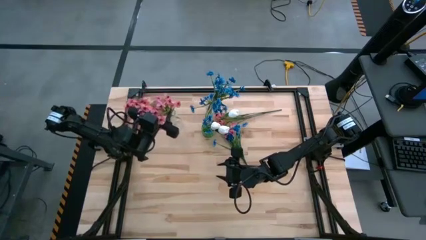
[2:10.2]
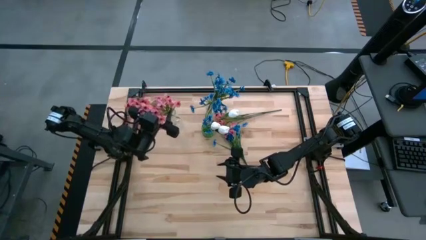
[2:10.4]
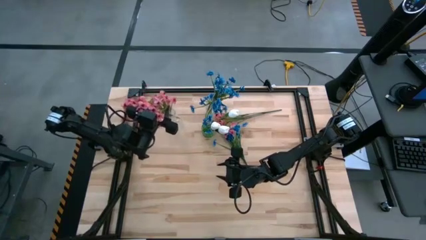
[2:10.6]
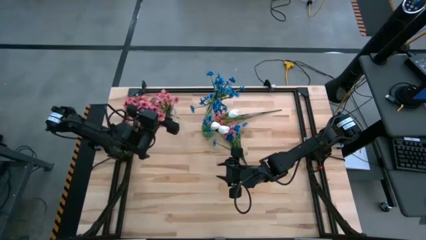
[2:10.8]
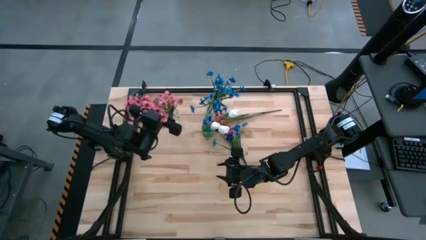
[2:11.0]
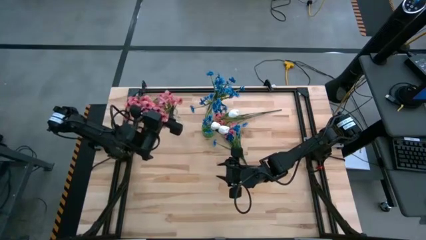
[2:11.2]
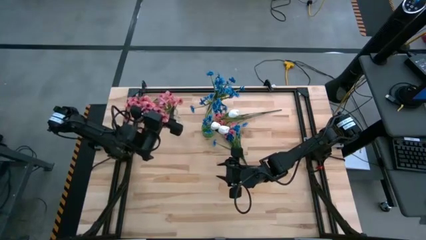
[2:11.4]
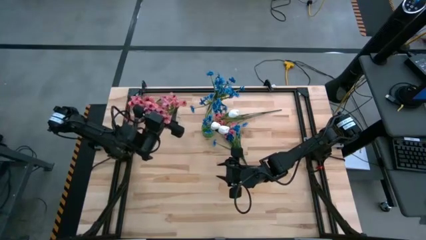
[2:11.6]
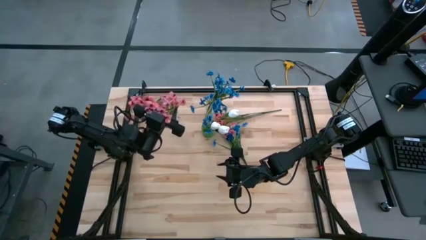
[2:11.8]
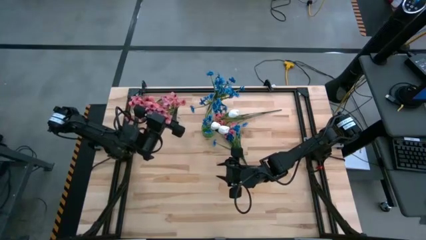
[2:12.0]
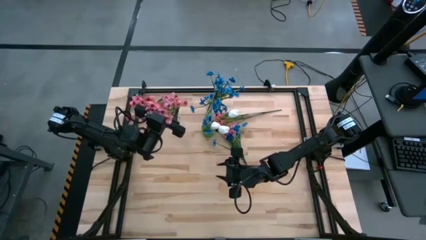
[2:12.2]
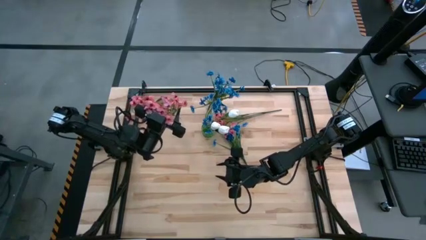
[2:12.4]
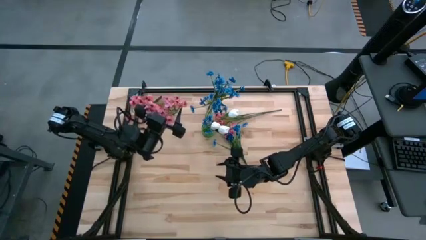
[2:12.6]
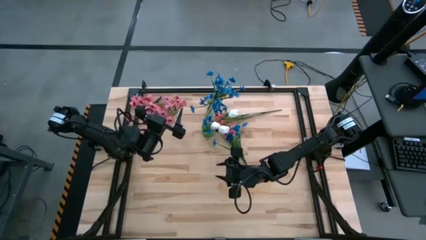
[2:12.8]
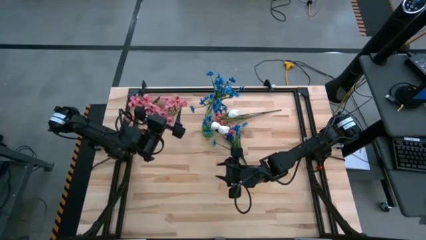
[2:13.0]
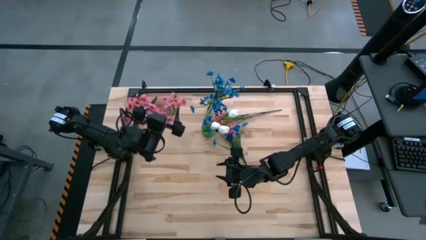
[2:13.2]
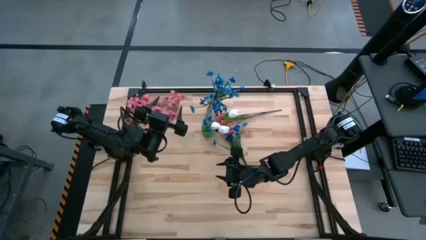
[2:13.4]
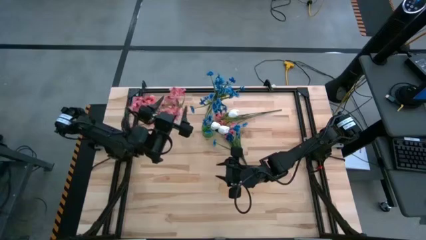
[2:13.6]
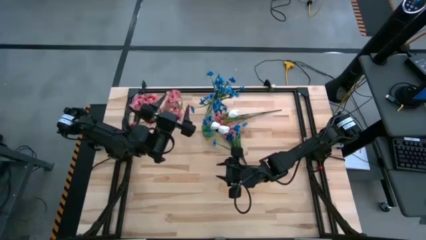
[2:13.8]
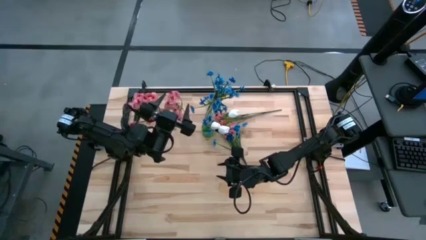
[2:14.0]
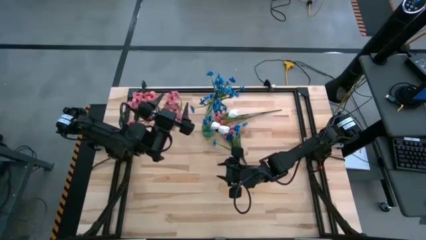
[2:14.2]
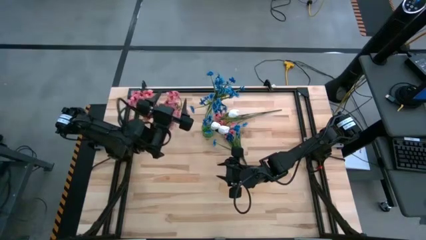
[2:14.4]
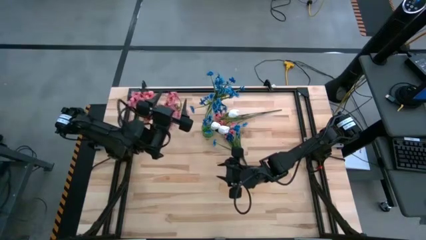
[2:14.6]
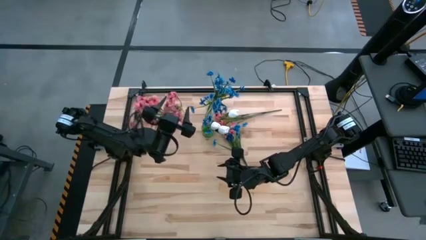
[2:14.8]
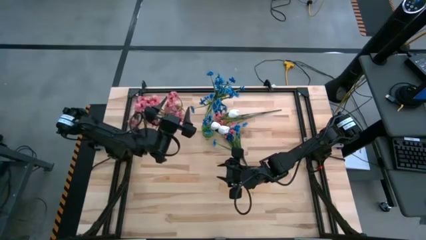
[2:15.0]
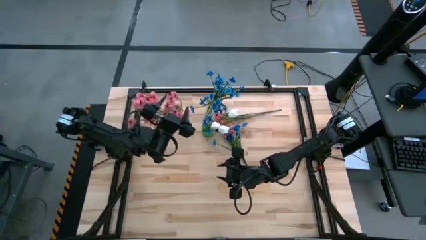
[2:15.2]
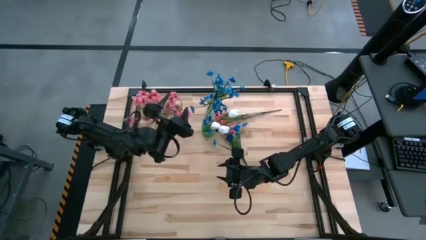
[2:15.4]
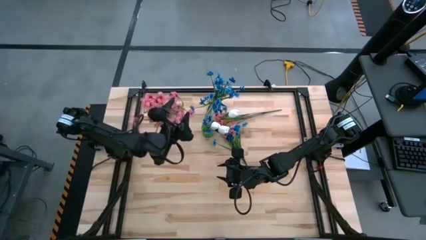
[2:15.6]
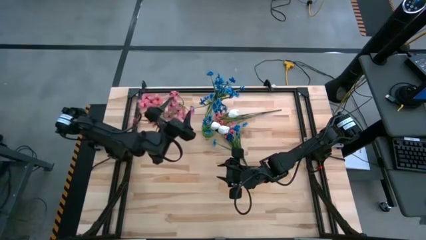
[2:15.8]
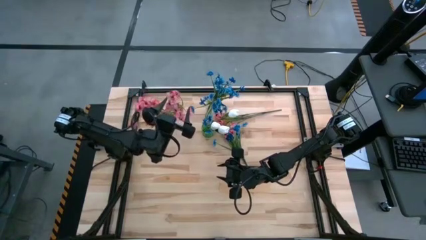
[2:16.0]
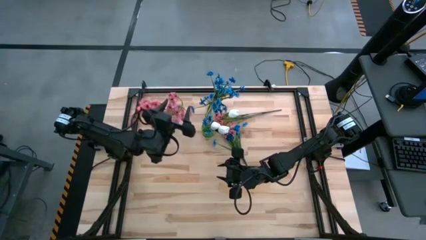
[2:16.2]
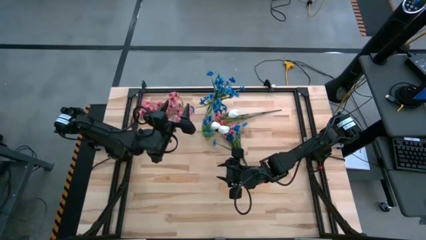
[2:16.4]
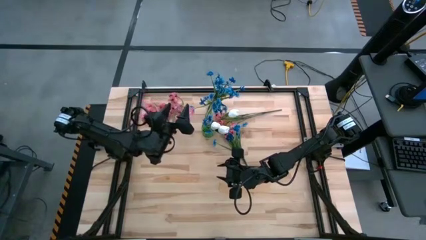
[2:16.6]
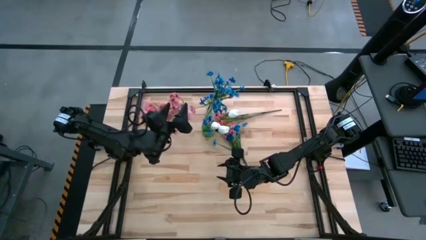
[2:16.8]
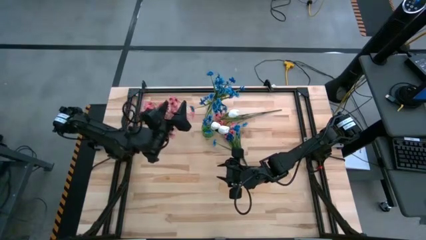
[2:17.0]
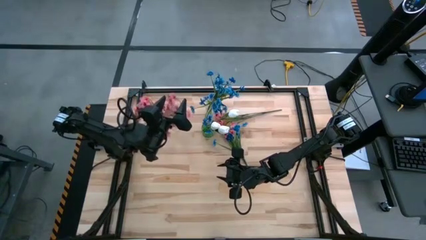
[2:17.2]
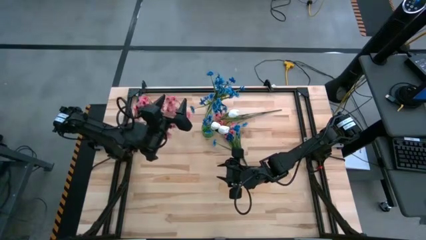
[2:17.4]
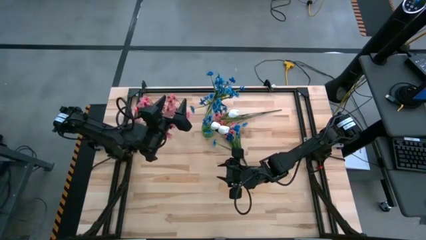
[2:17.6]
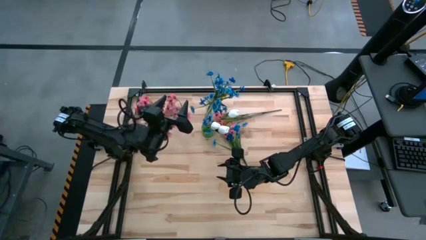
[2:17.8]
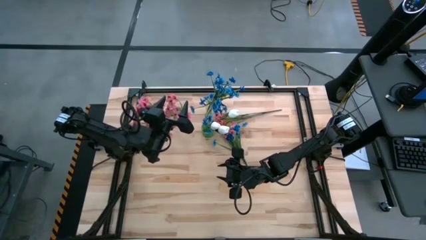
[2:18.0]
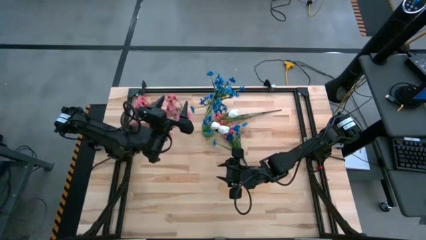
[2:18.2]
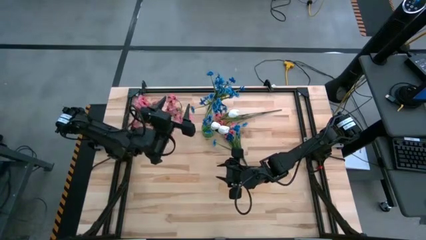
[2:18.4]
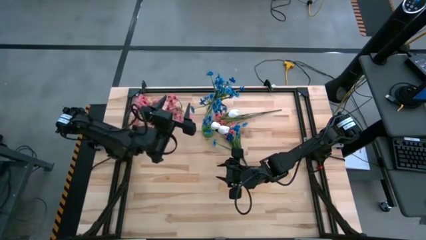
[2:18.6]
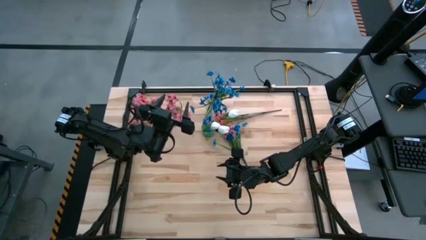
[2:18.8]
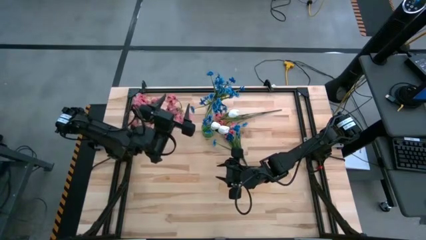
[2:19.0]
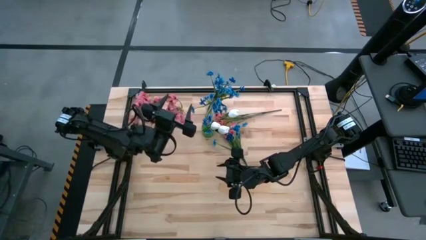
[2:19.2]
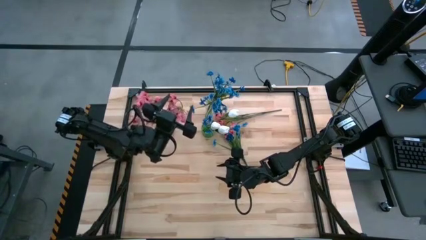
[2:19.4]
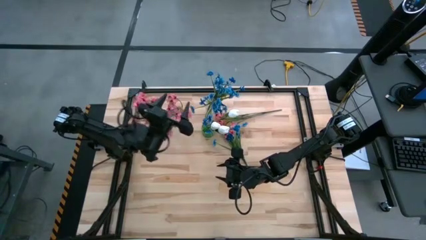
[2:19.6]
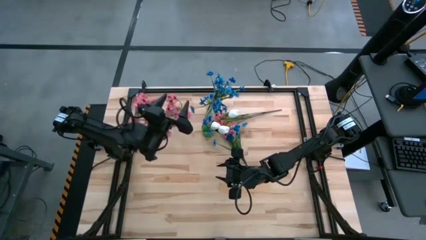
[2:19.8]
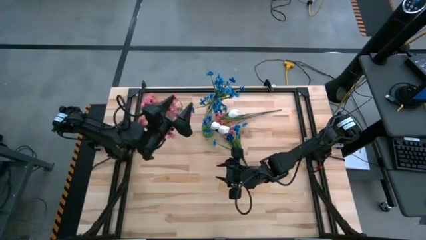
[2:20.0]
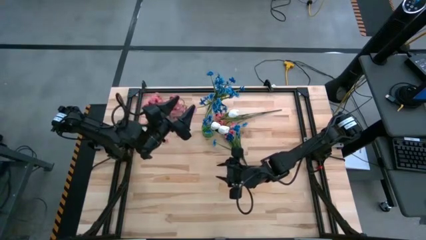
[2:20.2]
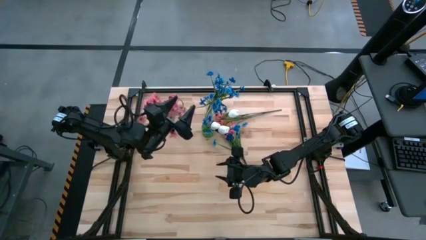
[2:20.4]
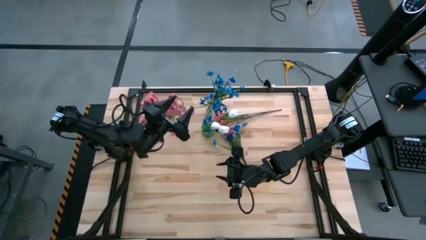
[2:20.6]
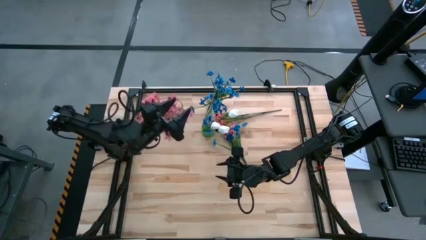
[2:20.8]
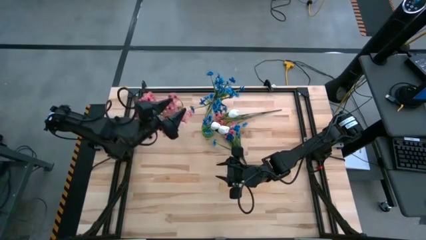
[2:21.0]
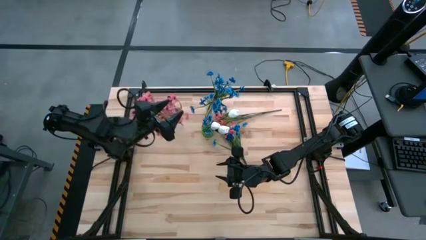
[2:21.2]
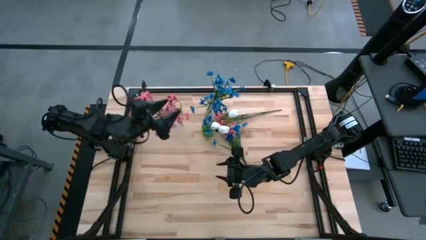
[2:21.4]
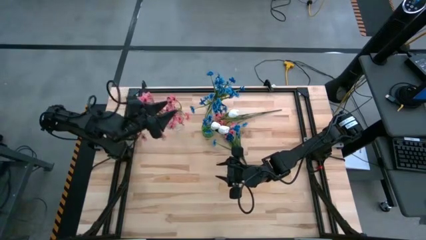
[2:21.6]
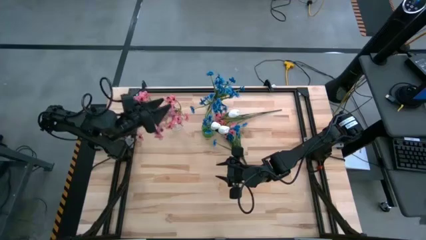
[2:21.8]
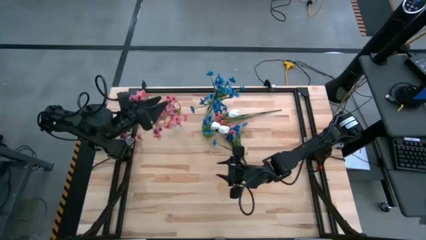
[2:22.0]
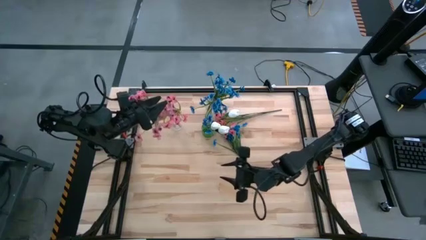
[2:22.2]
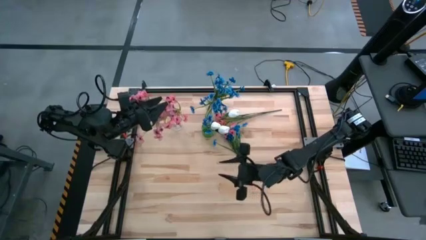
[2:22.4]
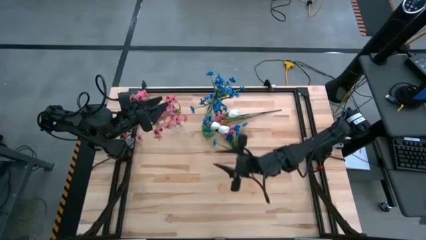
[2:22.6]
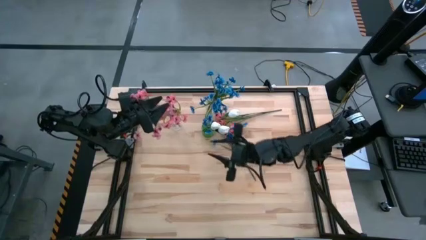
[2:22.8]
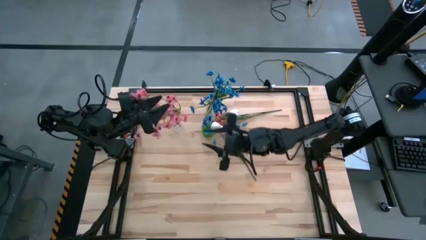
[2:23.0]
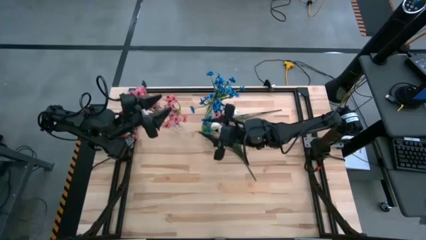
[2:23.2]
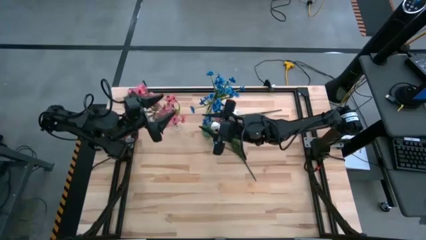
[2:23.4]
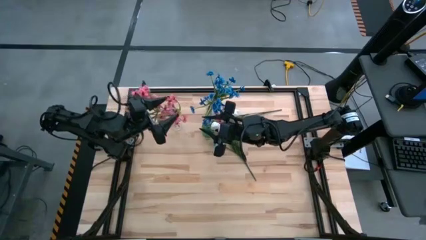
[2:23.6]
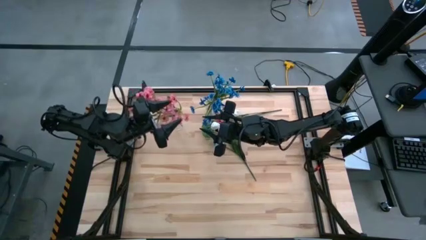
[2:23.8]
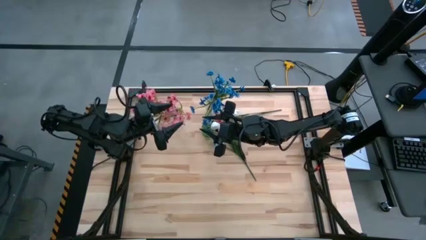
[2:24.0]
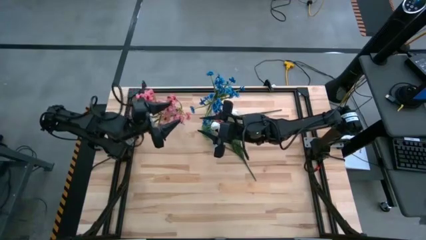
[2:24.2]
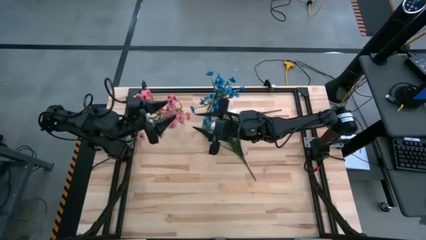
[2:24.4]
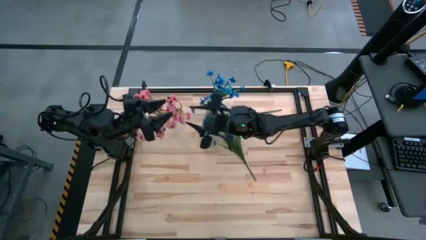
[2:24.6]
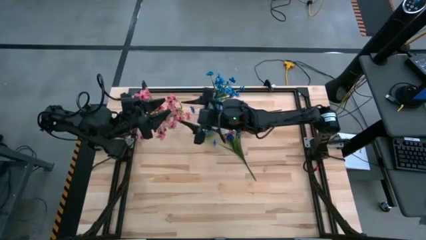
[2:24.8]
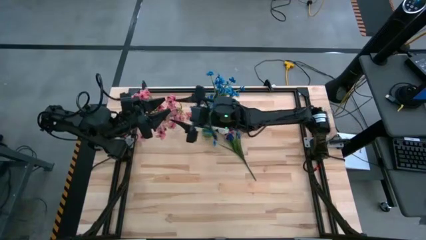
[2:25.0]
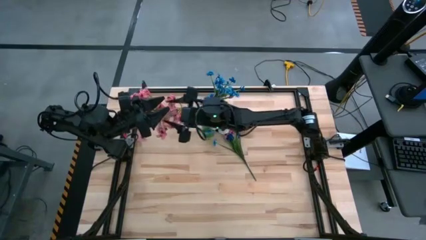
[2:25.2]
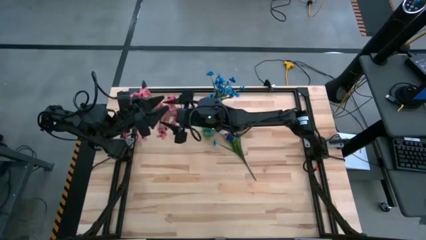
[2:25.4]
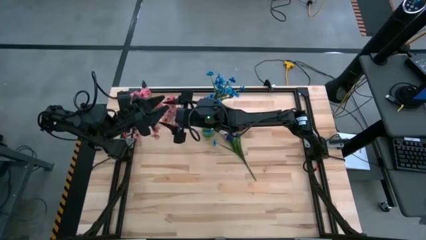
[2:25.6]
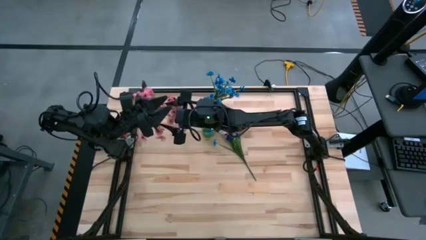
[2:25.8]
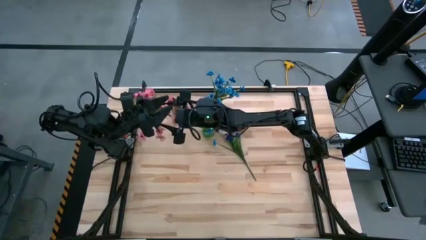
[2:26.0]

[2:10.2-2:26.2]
Task: Sort flowers into vase by color
Put the bottom pink flowers into the left transparent vase

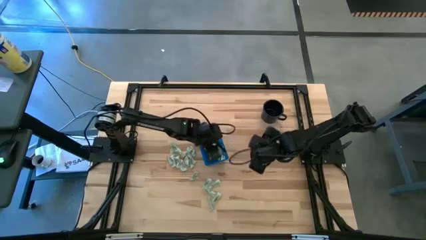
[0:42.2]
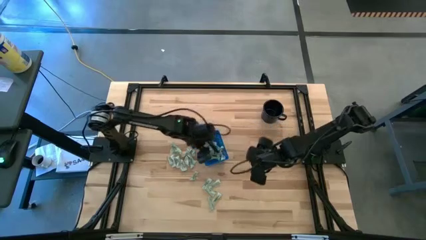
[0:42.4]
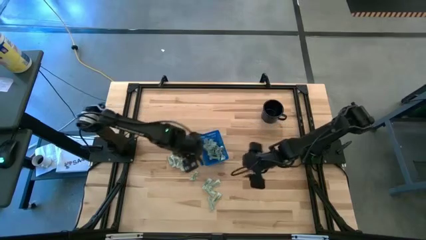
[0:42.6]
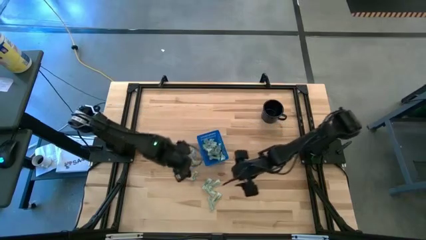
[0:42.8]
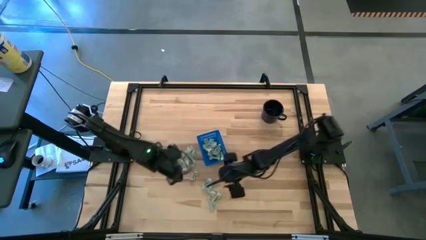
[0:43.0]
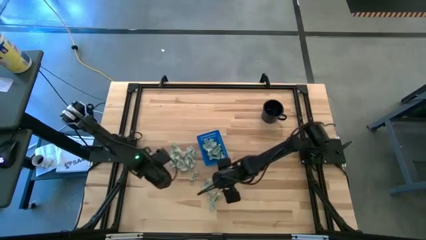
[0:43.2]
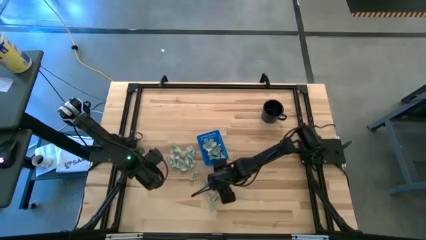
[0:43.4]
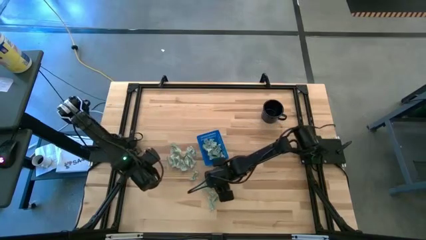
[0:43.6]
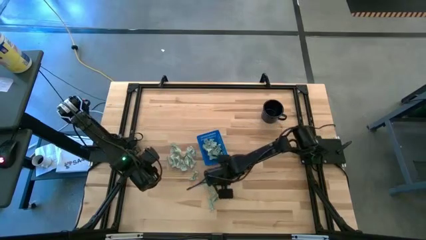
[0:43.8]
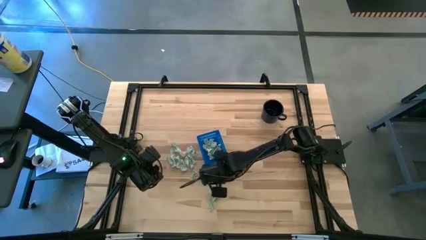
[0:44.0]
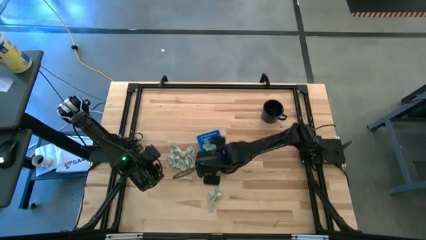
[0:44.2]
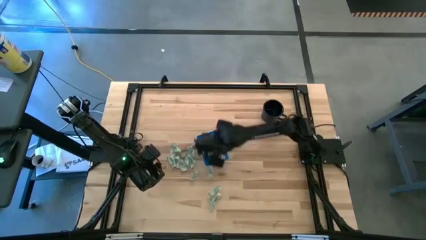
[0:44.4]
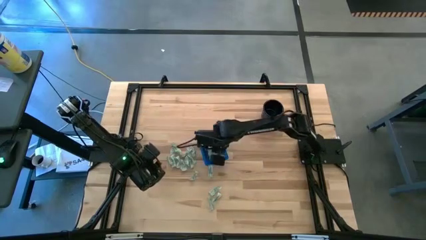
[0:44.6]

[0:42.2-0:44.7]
Task: Pick and place Stevia / Truvia into bins
Put the stevia packet into the basket
